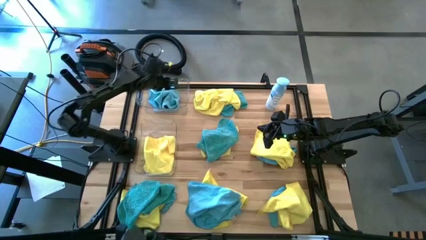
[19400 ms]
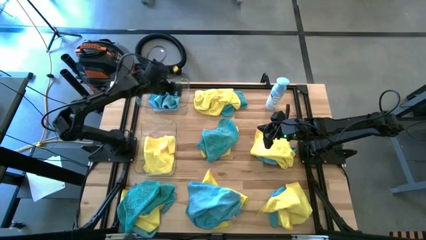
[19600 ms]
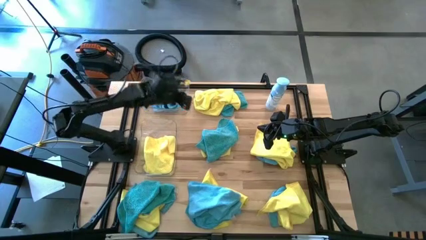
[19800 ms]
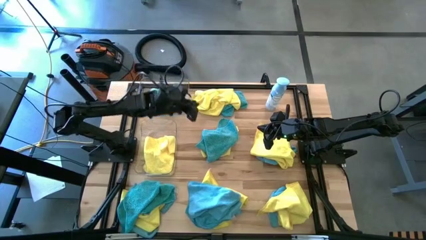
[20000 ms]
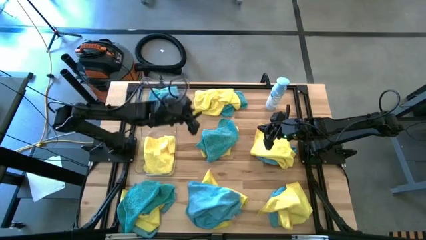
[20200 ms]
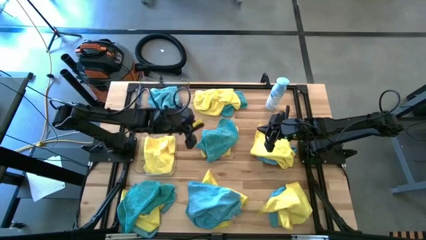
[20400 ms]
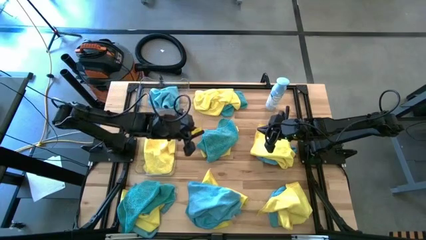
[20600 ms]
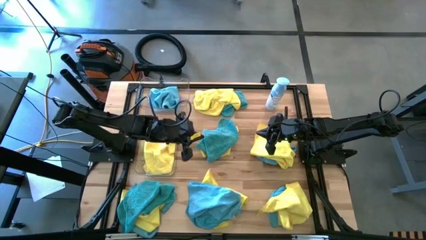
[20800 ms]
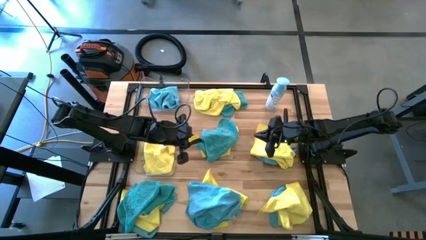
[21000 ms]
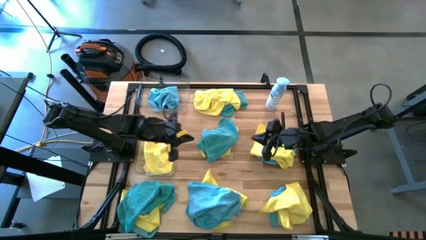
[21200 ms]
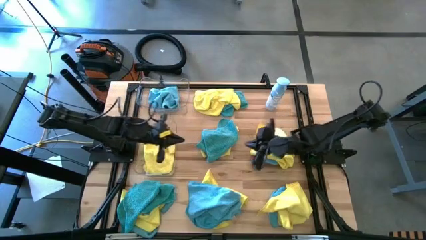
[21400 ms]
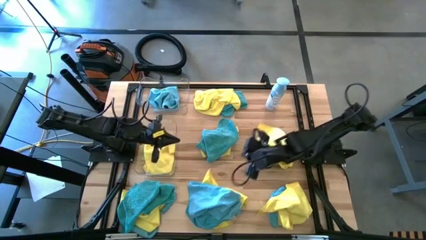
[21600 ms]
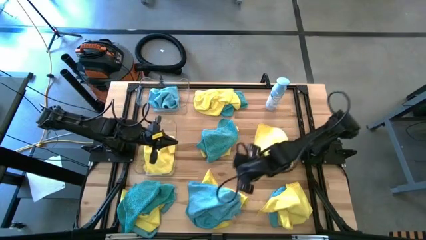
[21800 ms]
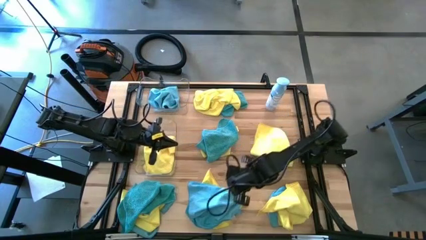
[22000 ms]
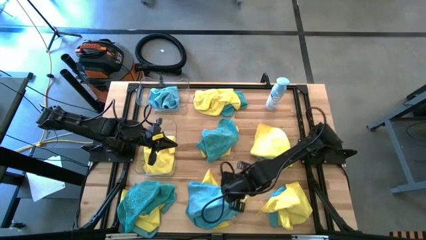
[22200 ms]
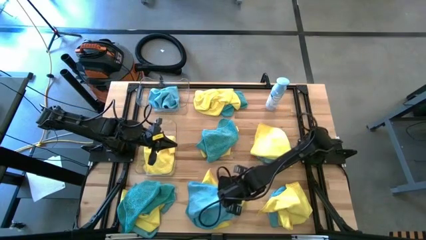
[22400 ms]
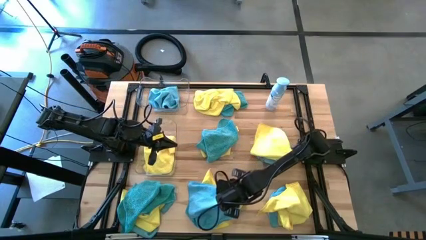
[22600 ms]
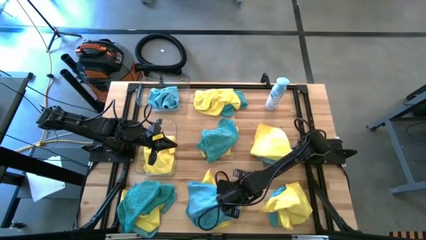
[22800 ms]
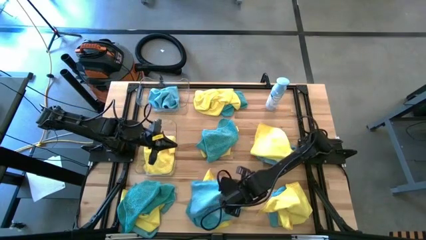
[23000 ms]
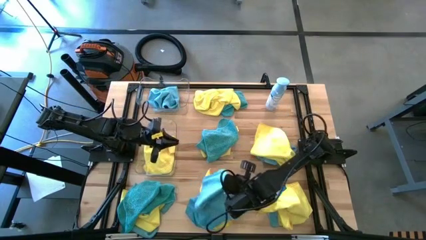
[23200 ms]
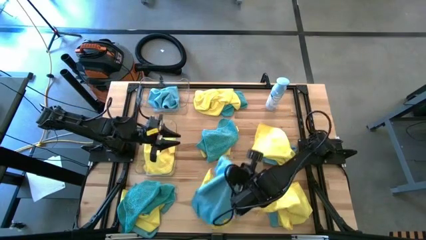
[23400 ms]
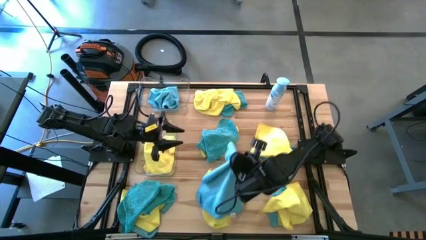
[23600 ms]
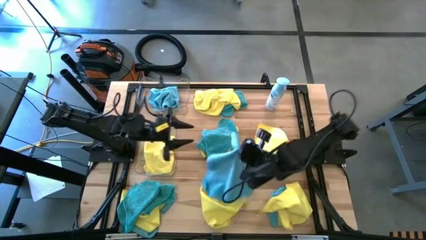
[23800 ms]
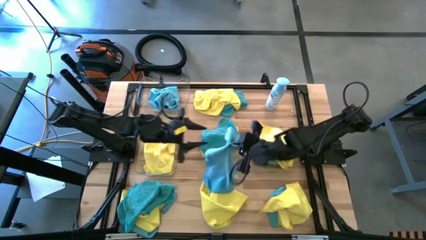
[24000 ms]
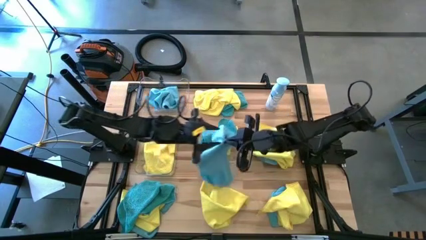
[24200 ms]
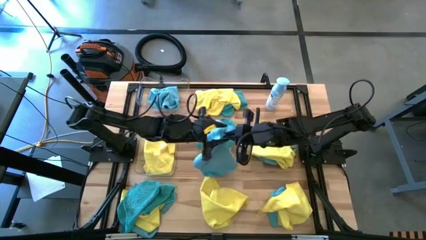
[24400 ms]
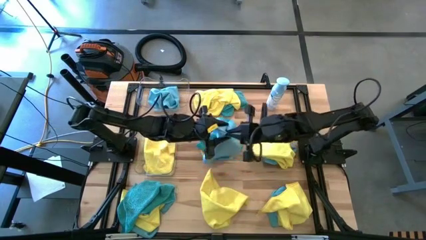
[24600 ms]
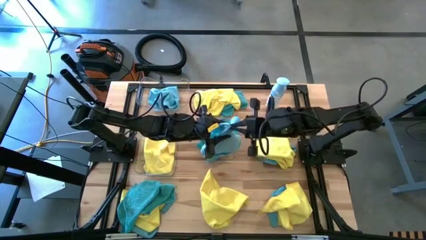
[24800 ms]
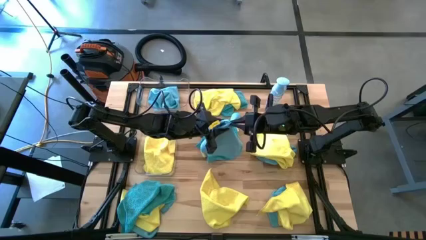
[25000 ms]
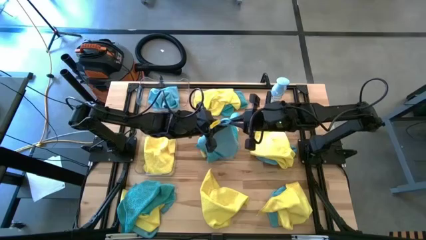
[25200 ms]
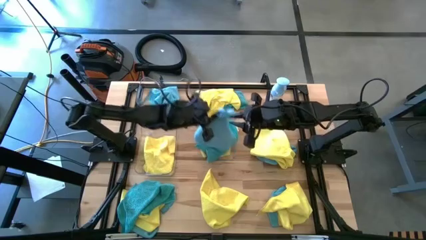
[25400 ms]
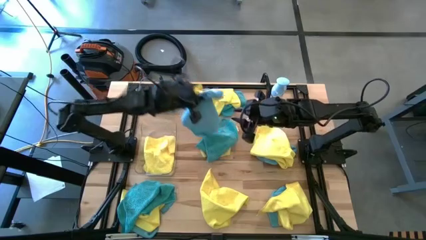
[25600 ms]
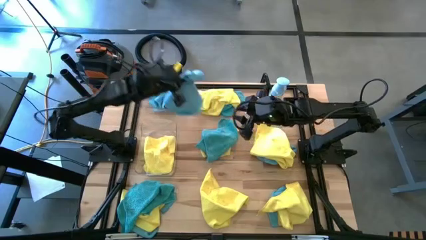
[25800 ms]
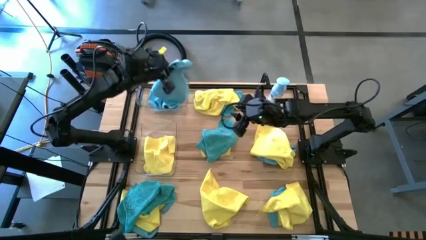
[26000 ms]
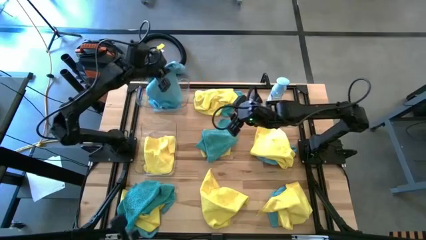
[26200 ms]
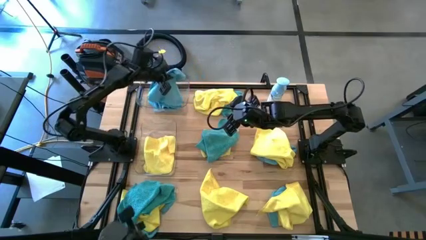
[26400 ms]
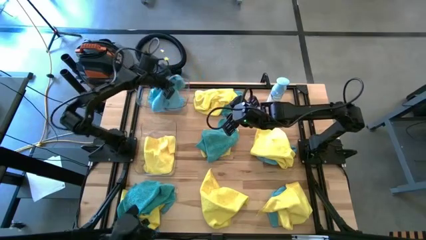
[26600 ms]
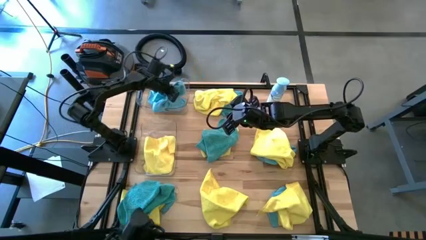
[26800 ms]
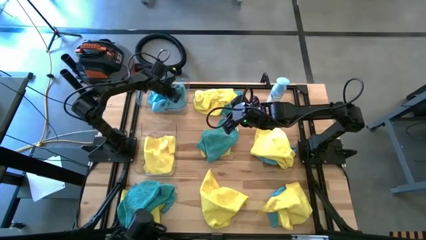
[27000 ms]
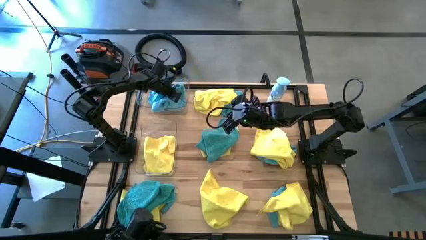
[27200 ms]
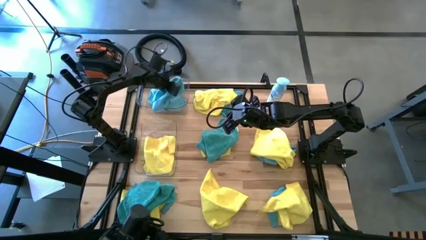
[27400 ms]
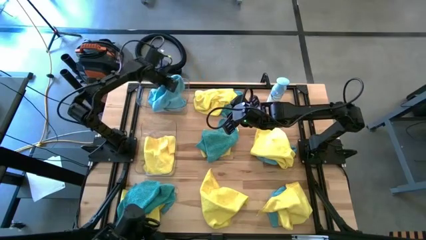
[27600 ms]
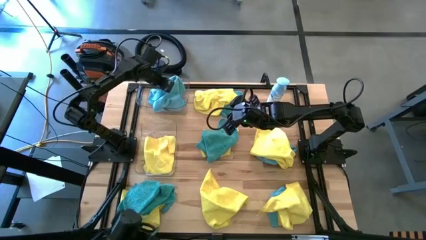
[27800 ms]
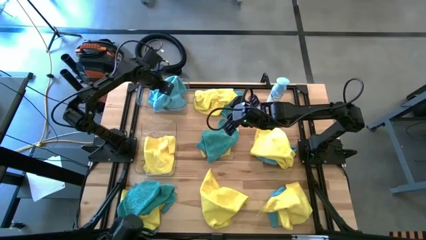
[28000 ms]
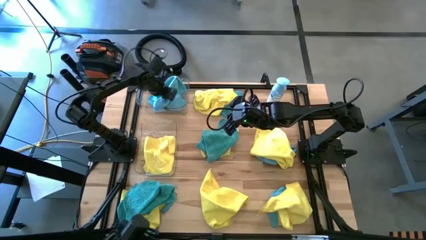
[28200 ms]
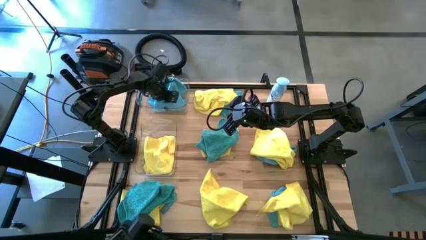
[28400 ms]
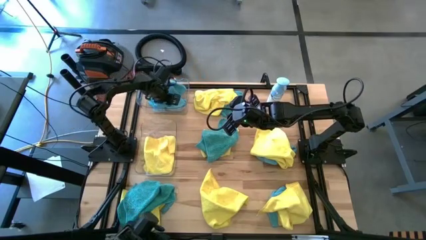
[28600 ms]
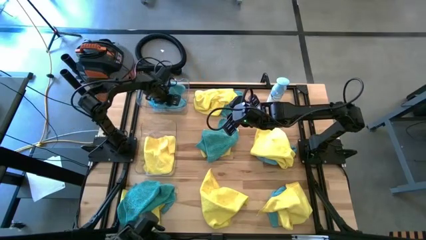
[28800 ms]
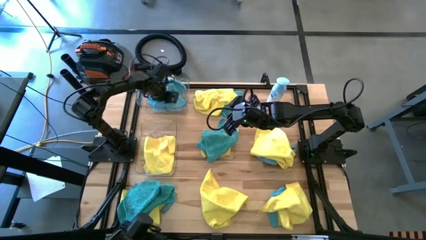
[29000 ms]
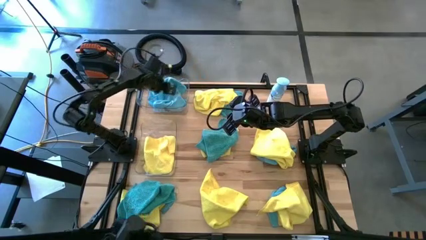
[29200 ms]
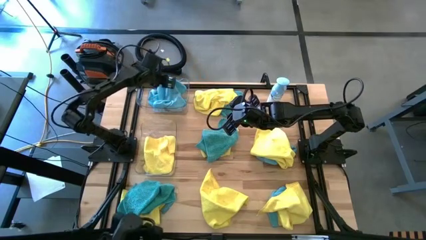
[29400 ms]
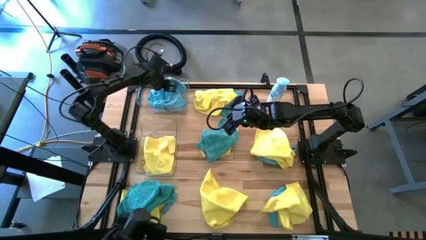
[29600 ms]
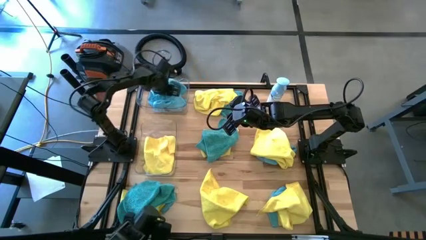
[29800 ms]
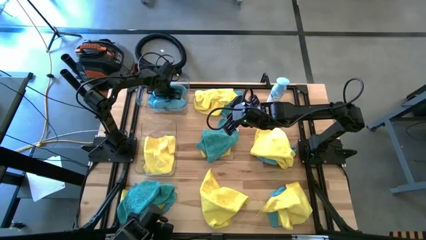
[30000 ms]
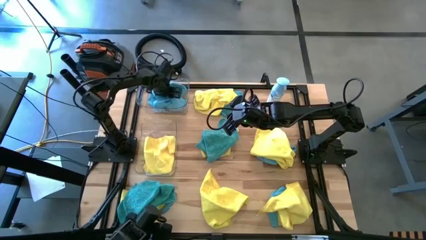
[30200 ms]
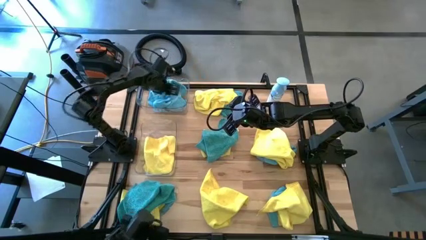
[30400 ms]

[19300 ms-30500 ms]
Task: Sort microfiber towel by color & place in baskets
Put the blue towel into the top transparent bin

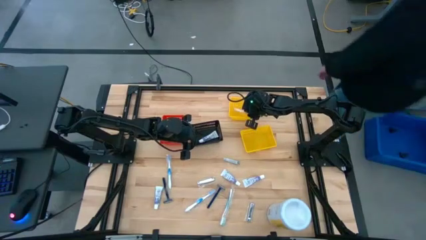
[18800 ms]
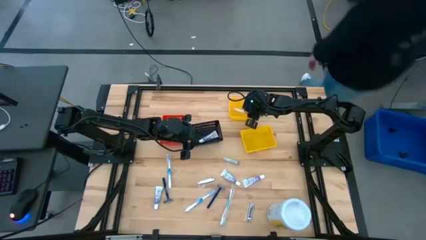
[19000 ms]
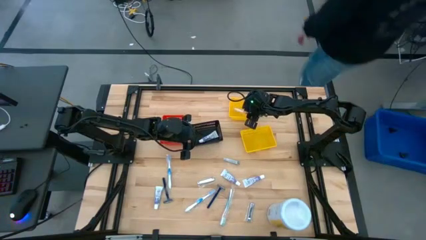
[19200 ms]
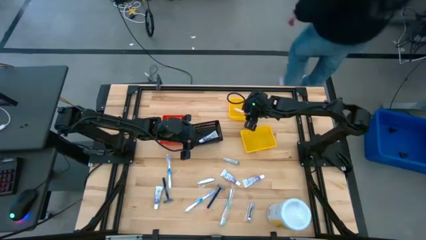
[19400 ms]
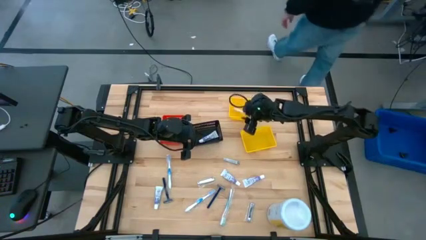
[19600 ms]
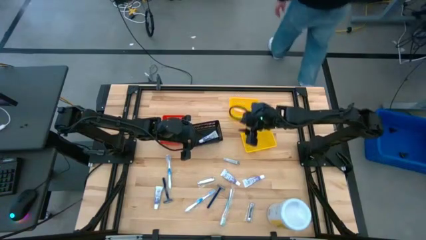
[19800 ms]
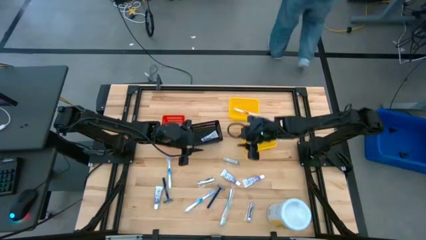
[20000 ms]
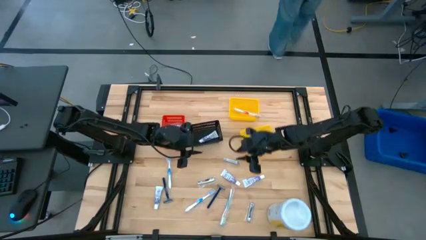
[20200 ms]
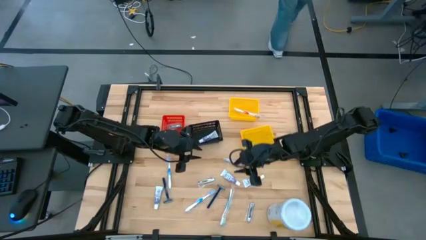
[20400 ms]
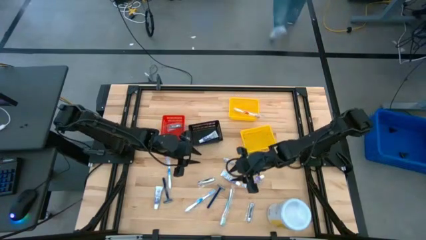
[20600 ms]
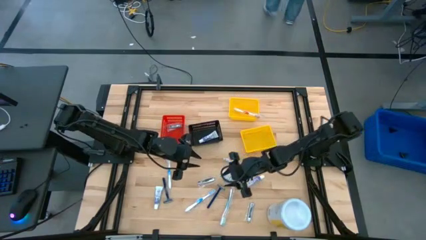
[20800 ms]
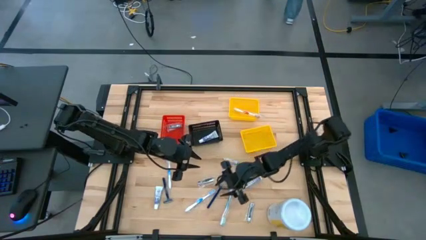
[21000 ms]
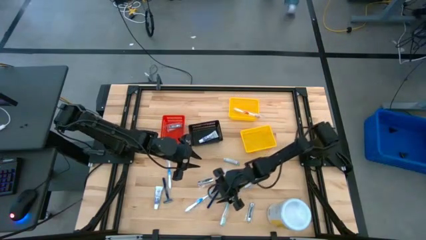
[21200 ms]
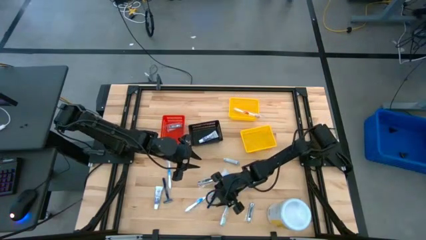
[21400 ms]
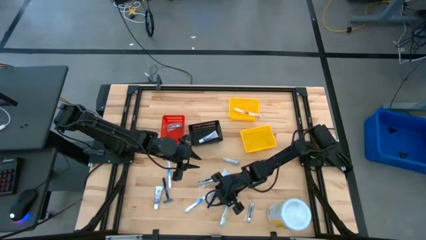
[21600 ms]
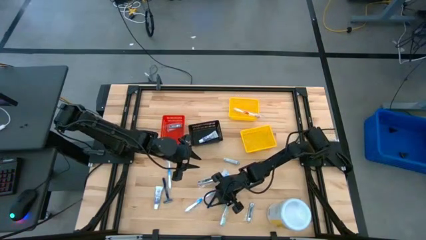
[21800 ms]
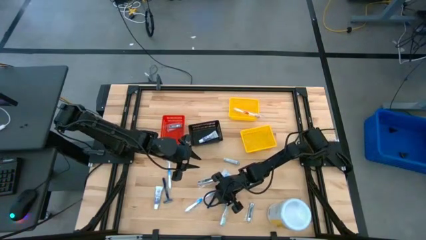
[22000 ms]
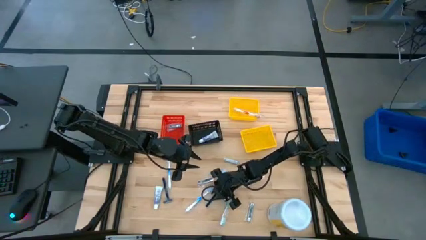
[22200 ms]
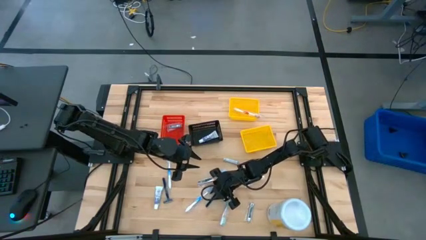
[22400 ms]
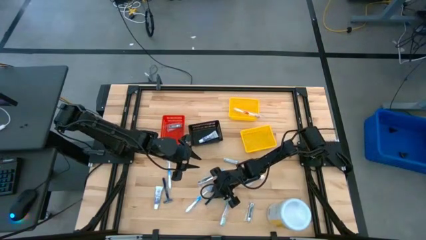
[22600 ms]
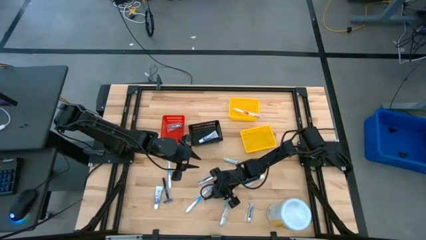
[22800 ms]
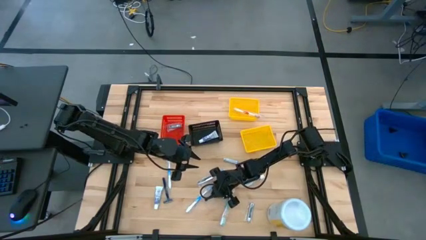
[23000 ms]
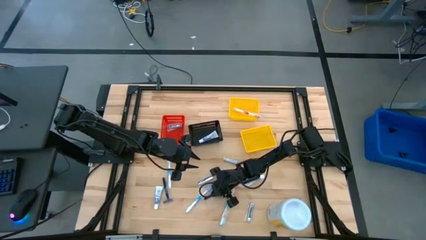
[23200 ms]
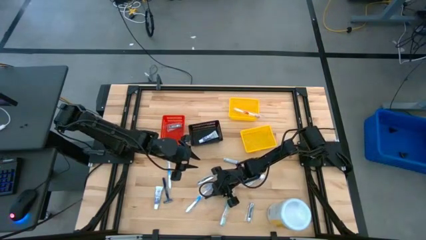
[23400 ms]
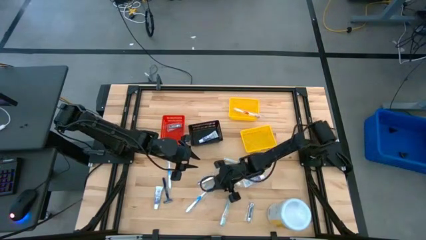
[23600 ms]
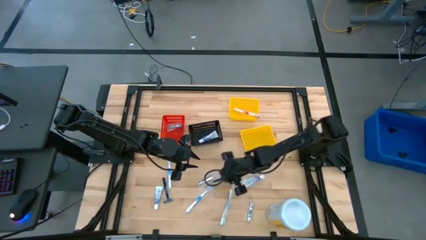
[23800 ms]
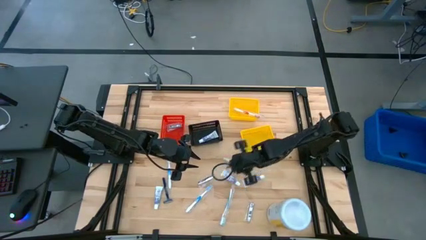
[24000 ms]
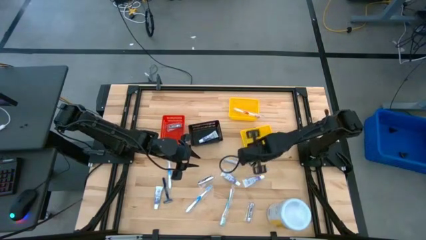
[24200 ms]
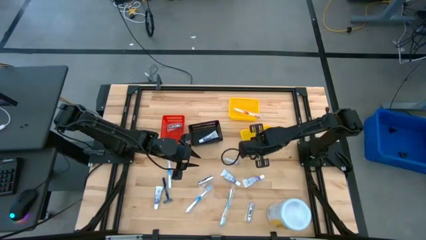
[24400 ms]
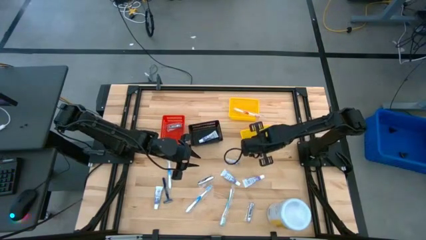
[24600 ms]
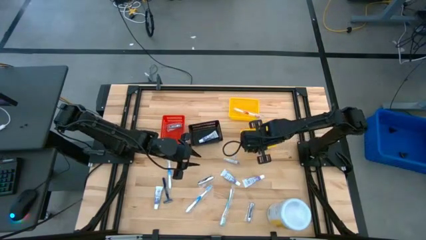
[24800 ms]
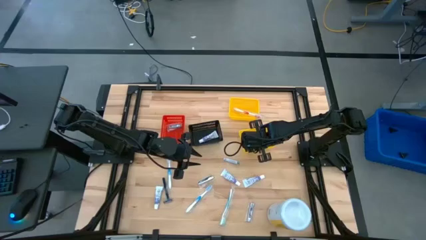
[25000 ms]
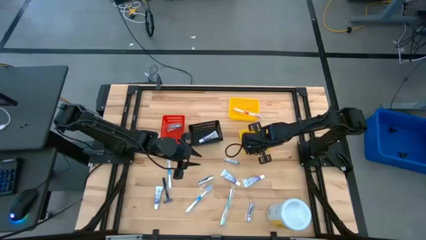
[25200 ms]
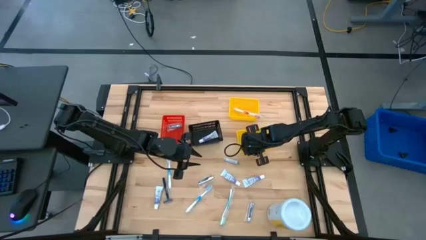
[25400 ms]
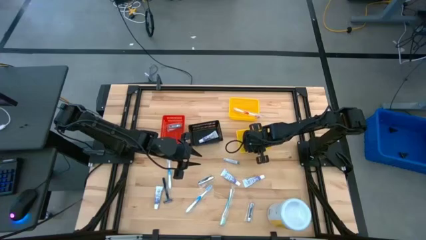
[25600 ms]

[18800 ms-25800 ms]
Task: Pick & Place Travel size toiletries
Put the blue razor into the bottom yellow bin
